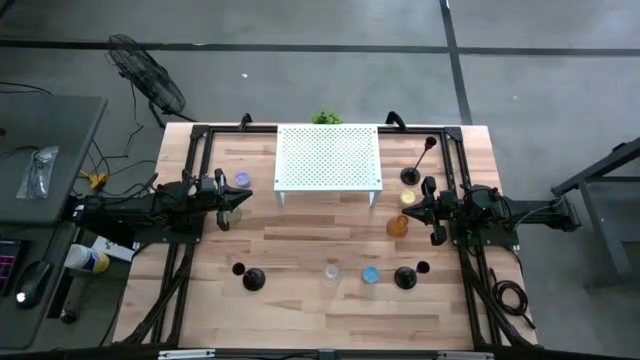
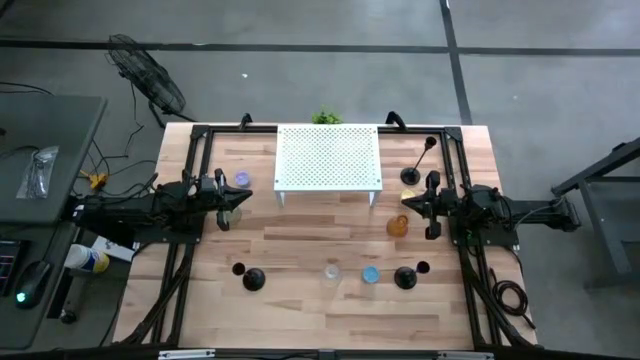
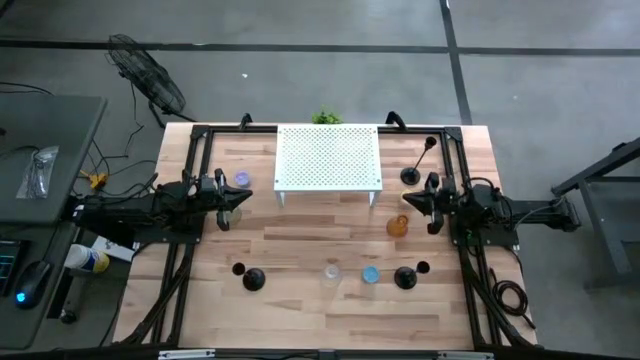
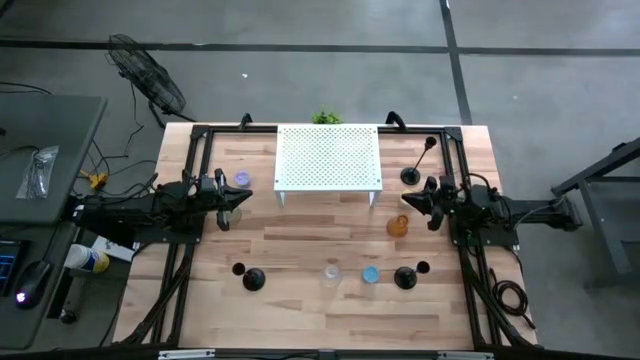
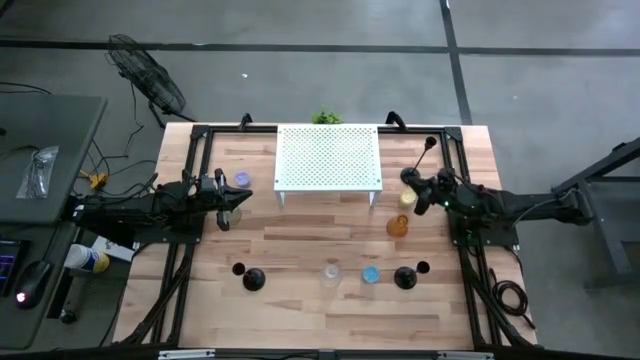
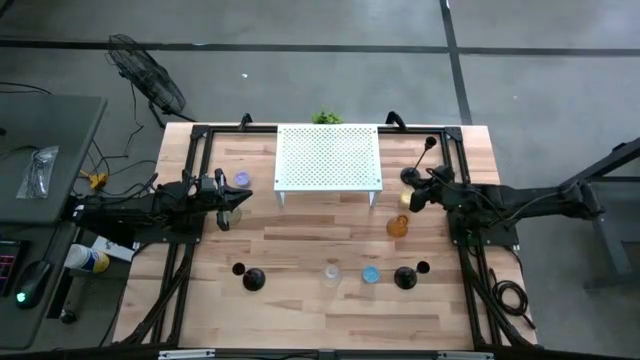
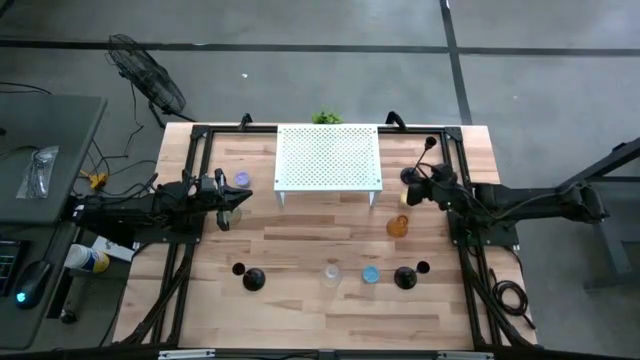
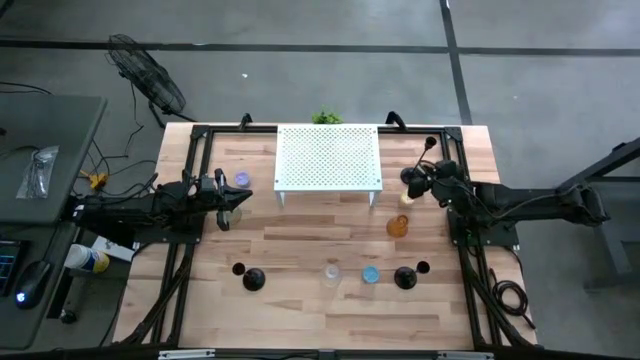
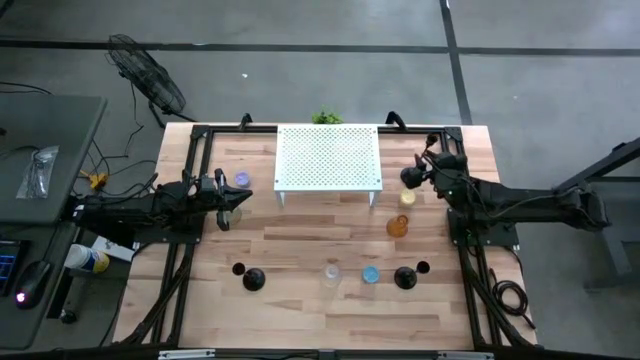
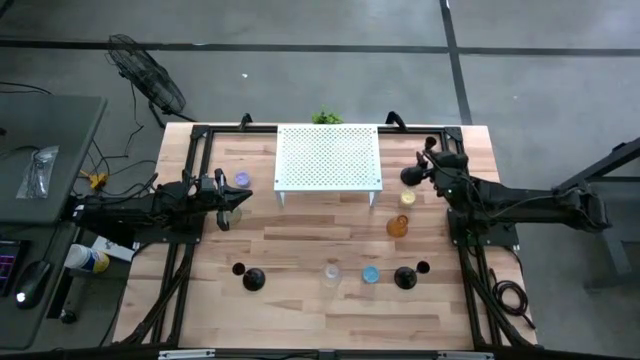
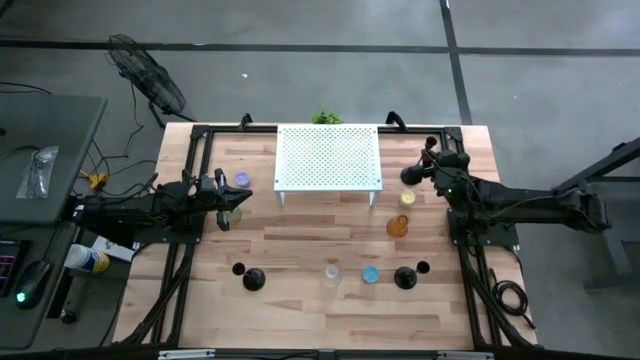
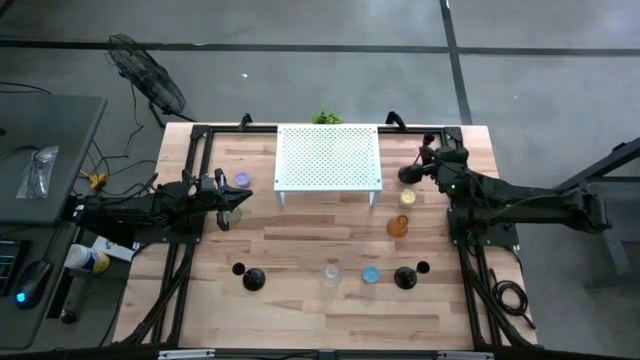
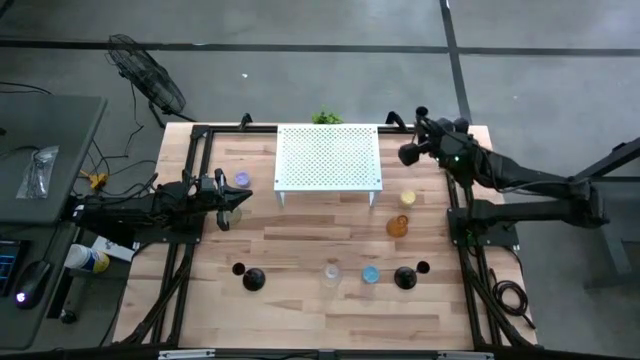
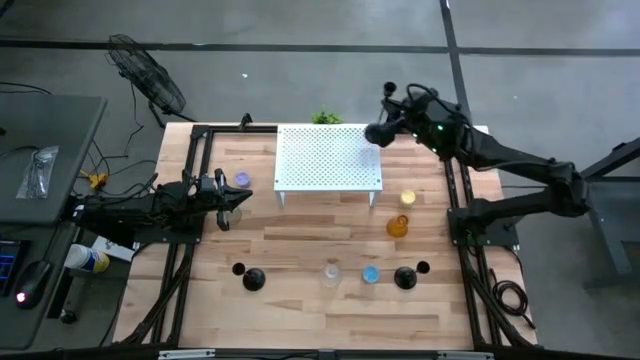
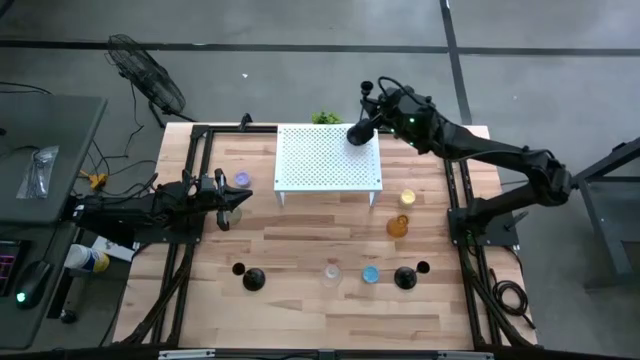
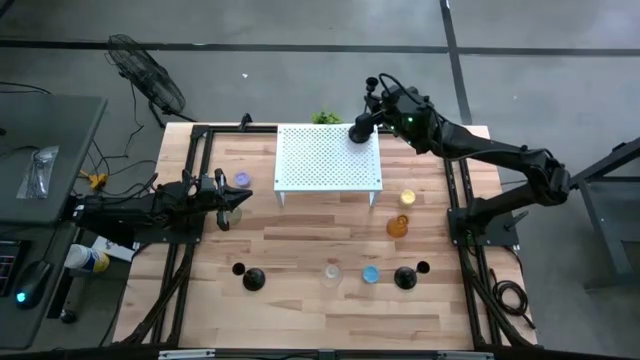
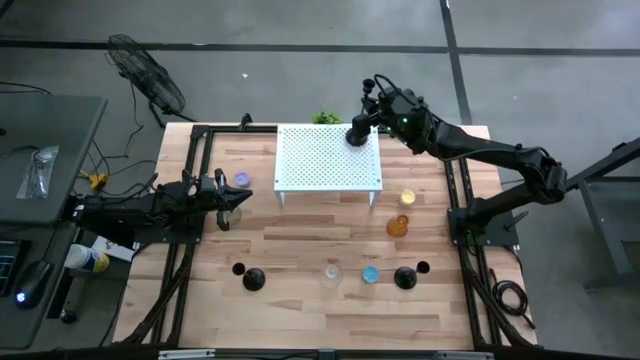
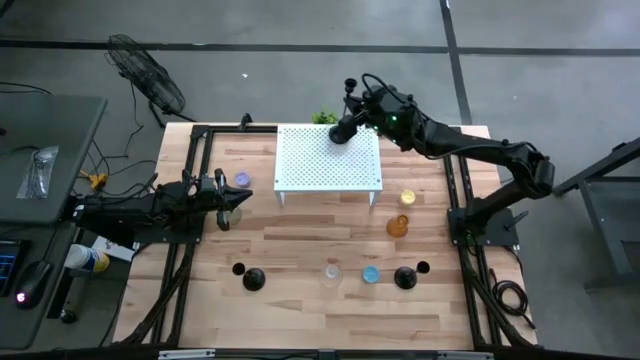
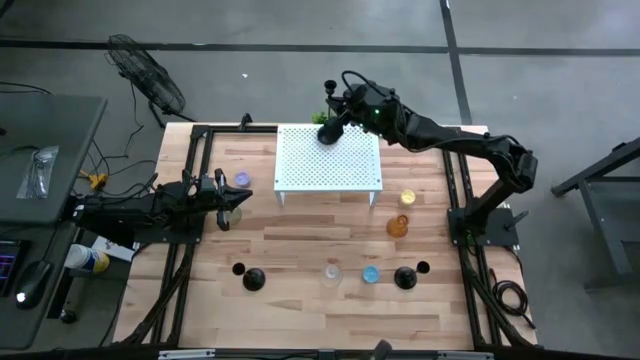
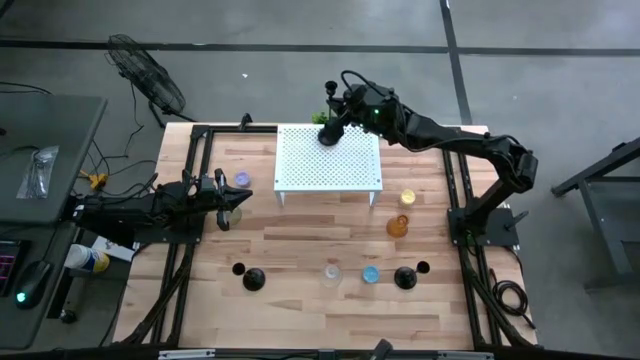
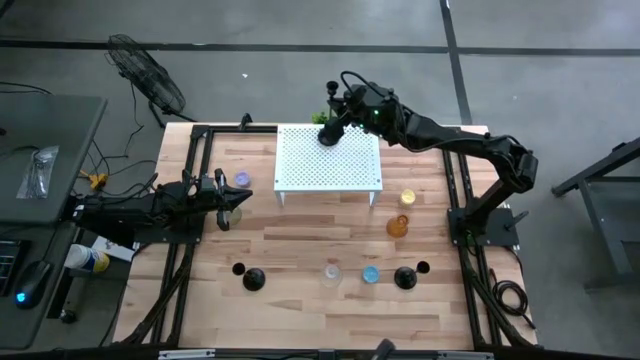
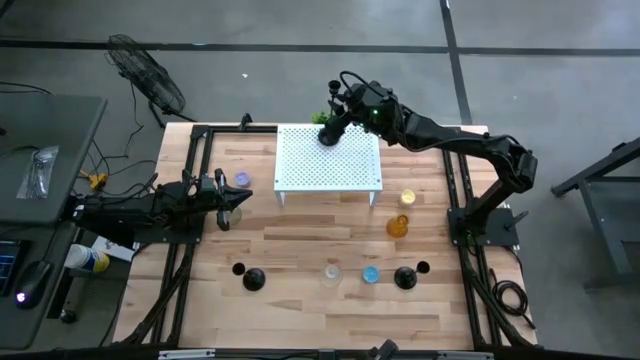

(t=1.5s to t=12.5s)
Task: Pick & Place candle stick holders
Put the top black candle holder on the shelf

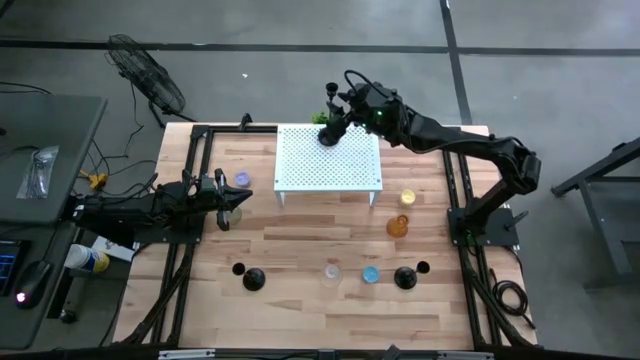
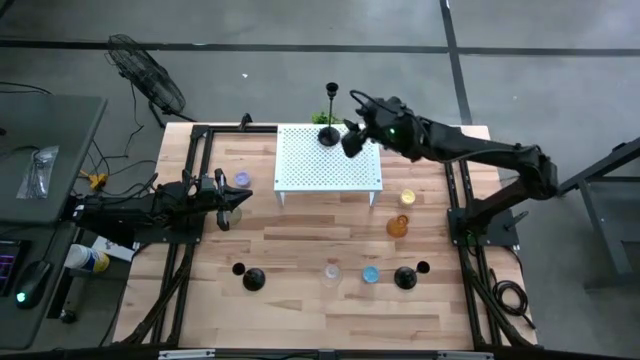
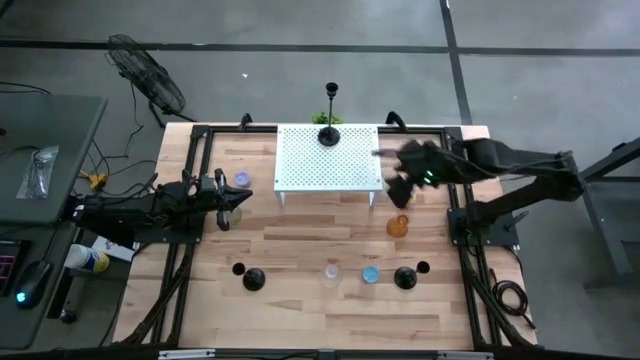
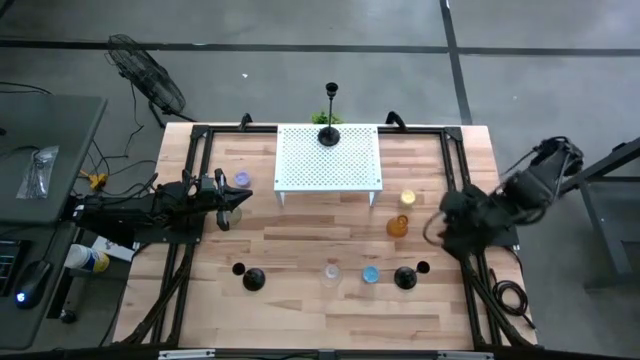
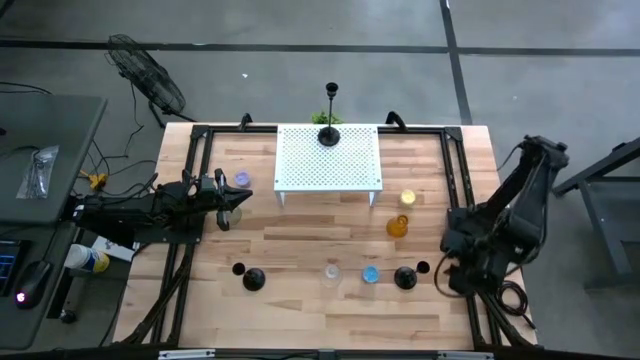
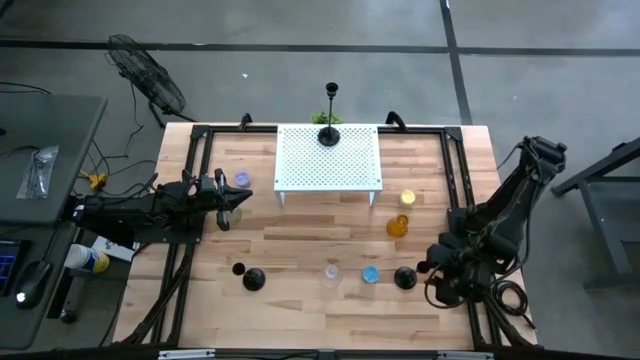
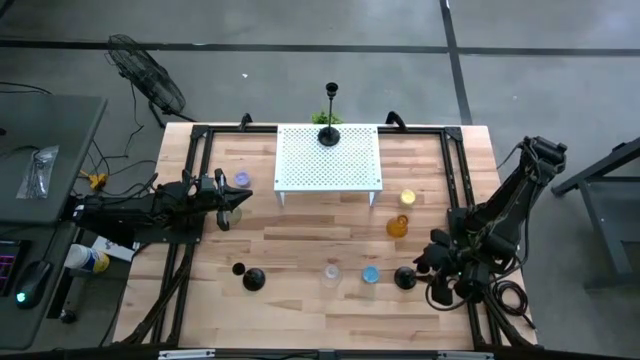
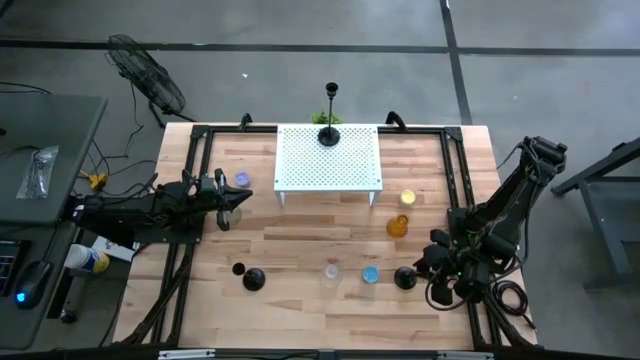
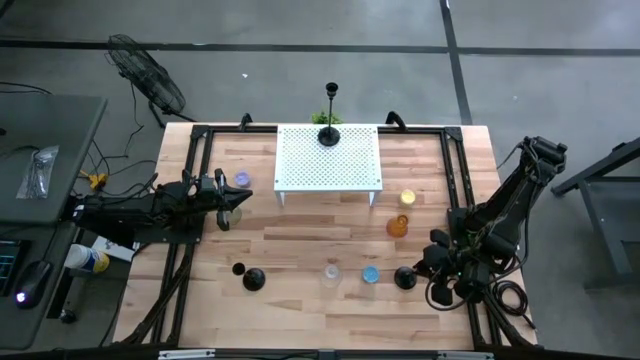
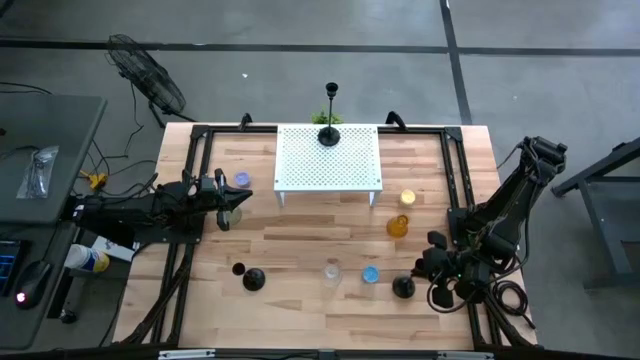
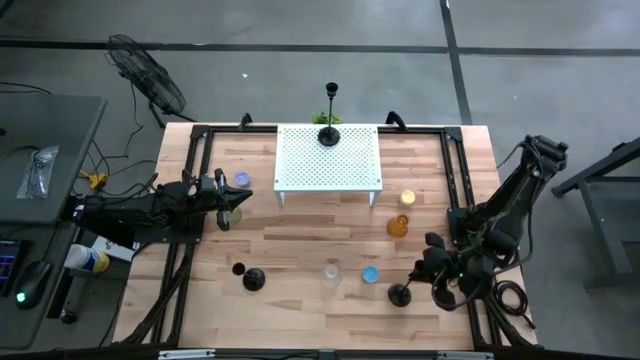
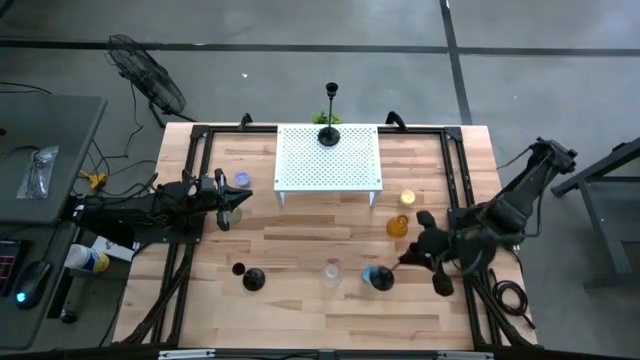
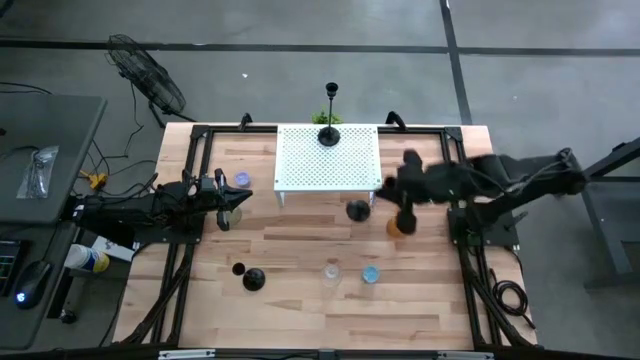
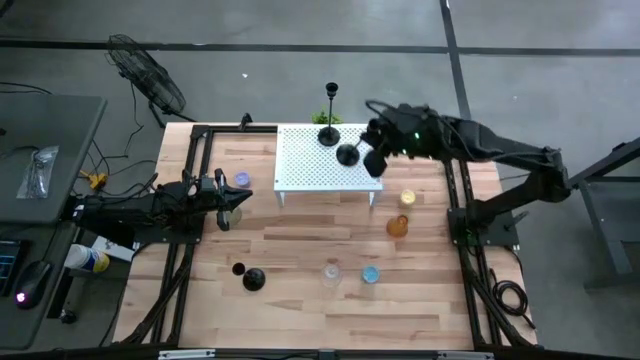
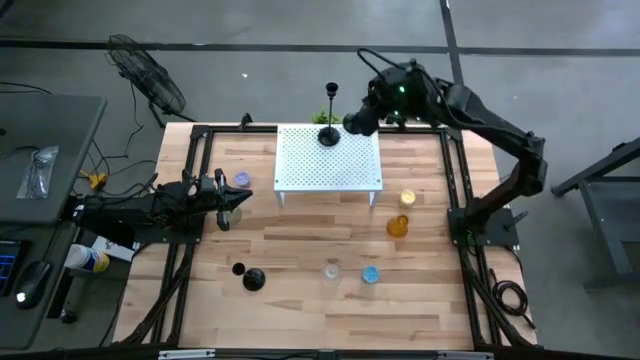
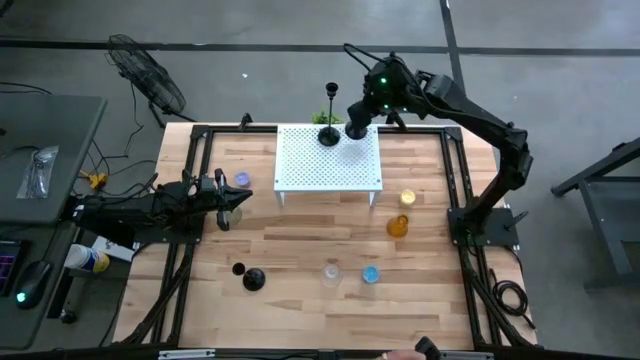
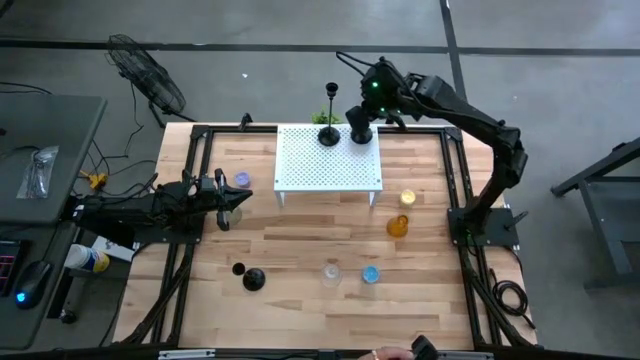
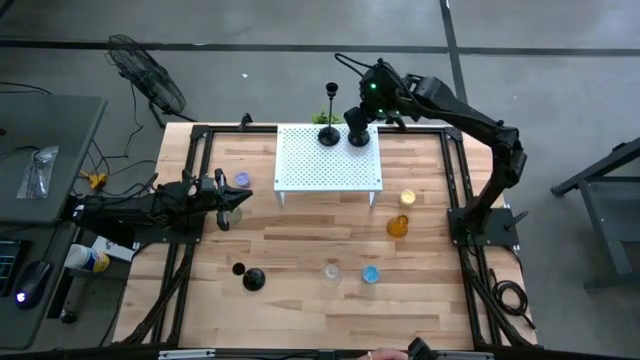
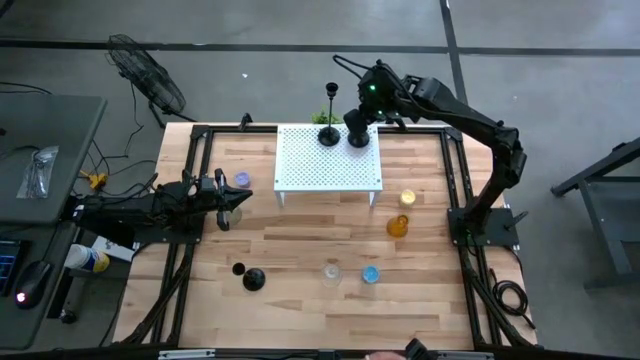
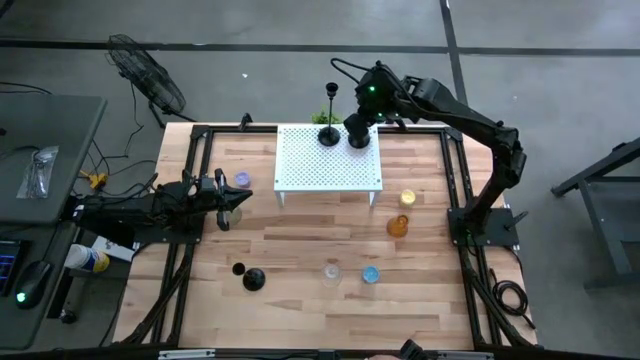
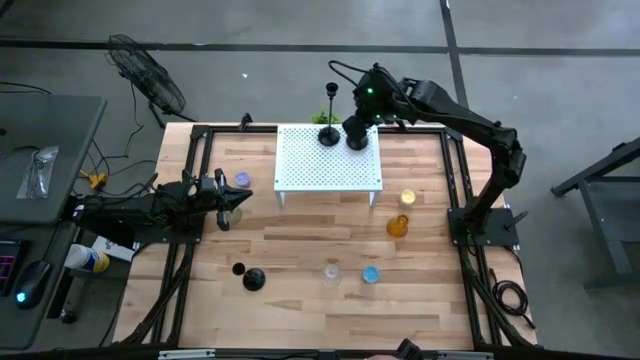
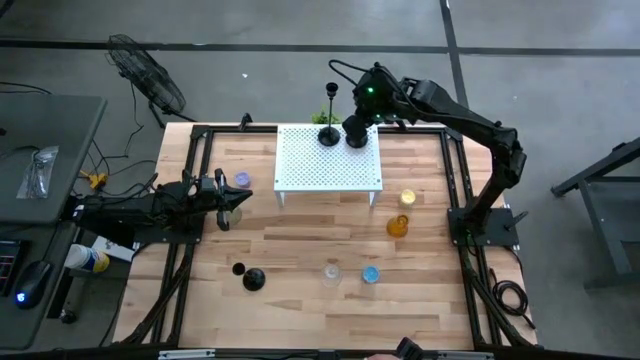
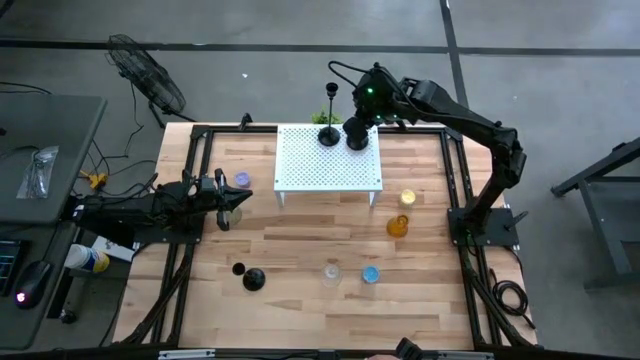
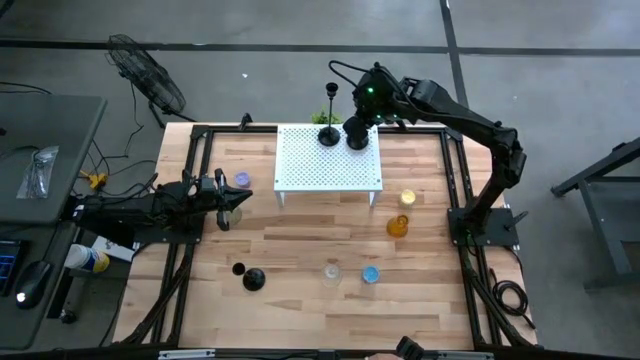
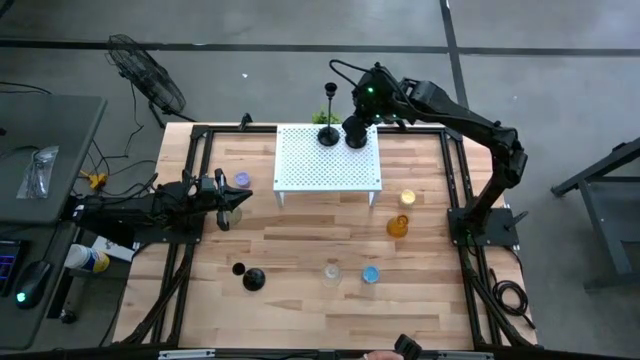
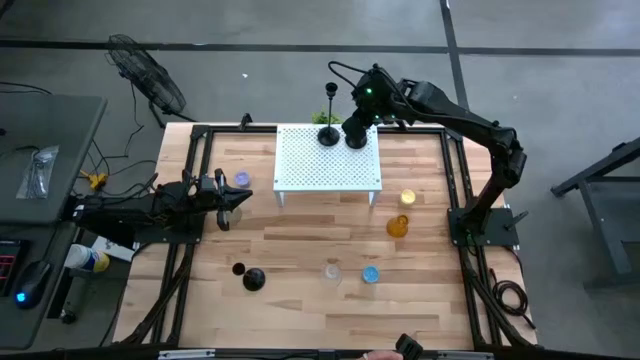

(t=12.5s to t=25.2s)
Put the right black candle holder on the shelf aligned with the black candle holder
